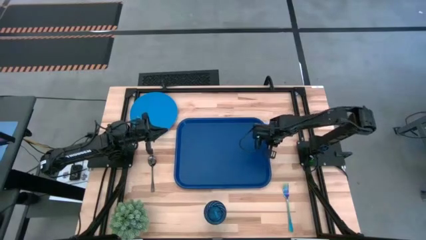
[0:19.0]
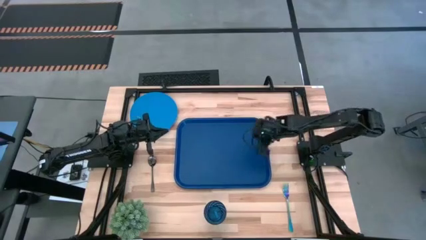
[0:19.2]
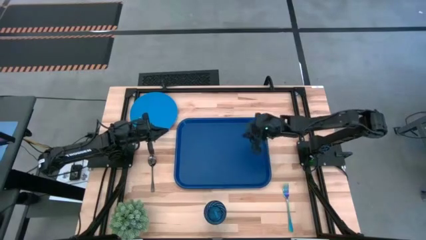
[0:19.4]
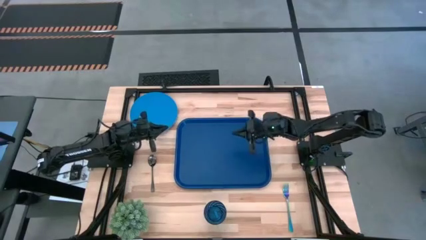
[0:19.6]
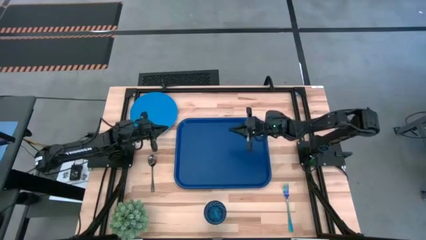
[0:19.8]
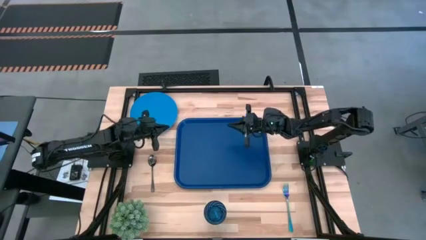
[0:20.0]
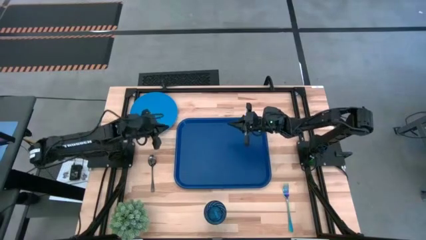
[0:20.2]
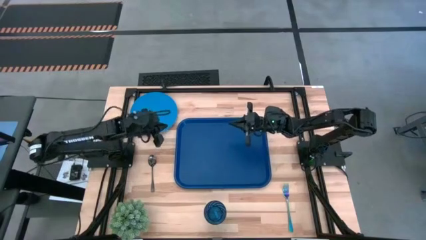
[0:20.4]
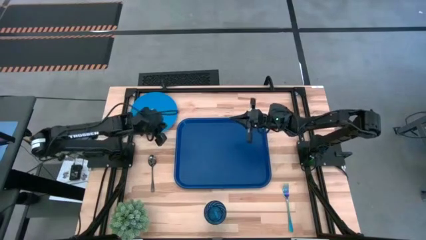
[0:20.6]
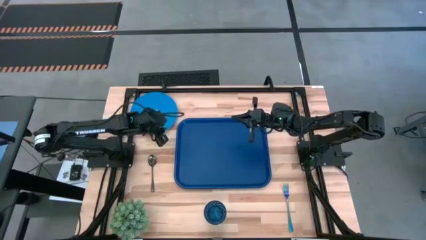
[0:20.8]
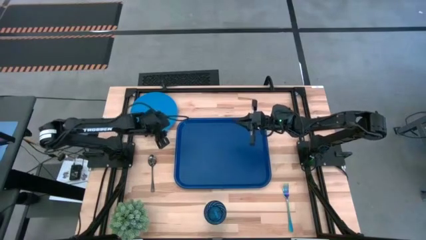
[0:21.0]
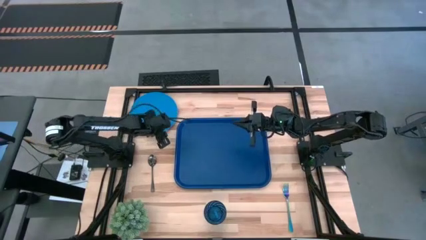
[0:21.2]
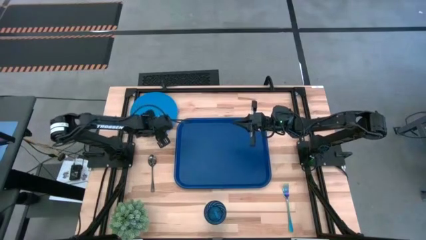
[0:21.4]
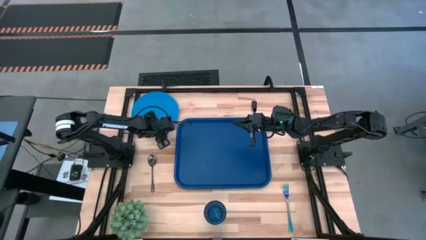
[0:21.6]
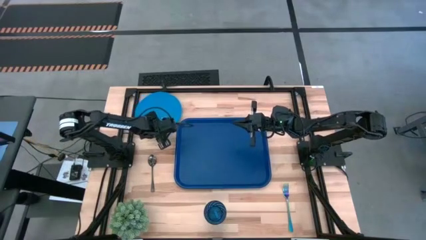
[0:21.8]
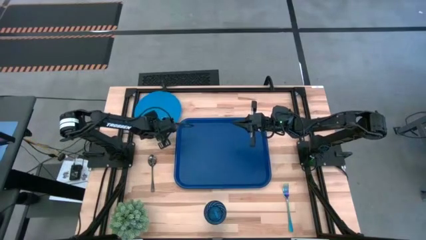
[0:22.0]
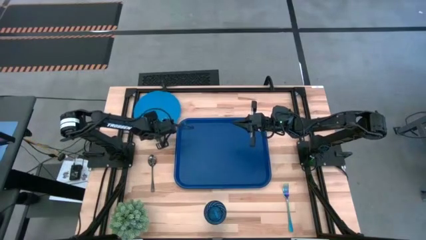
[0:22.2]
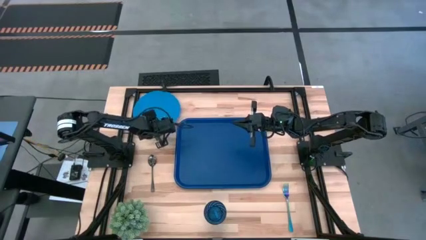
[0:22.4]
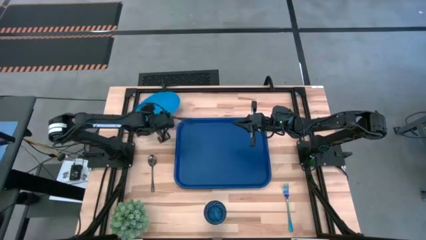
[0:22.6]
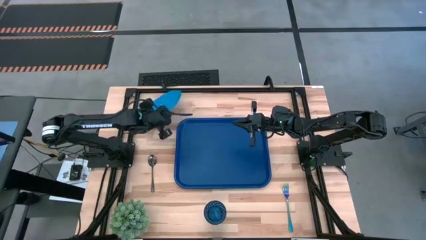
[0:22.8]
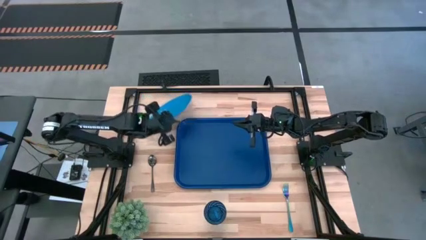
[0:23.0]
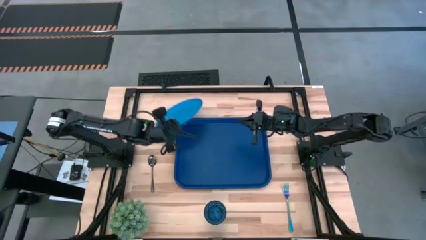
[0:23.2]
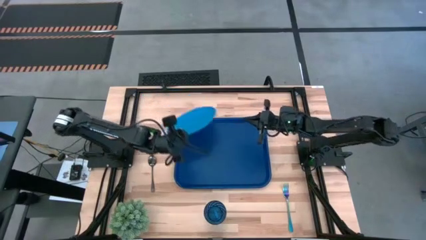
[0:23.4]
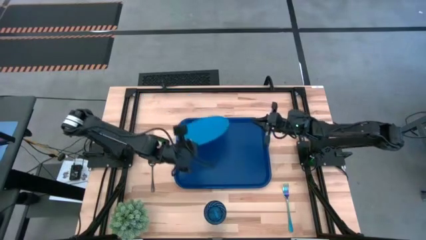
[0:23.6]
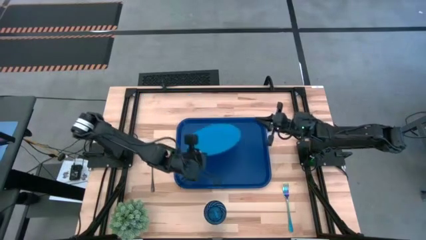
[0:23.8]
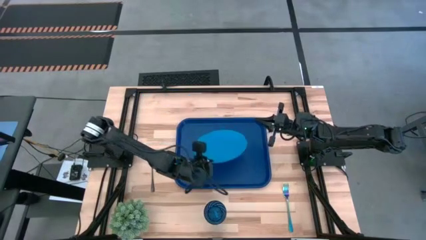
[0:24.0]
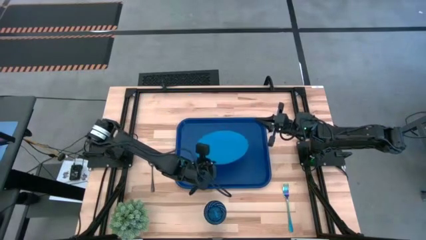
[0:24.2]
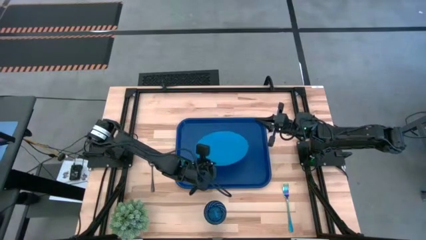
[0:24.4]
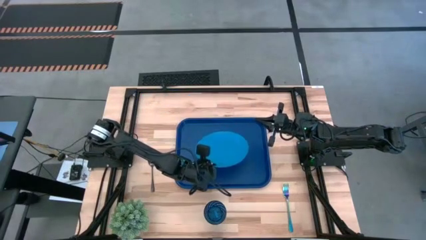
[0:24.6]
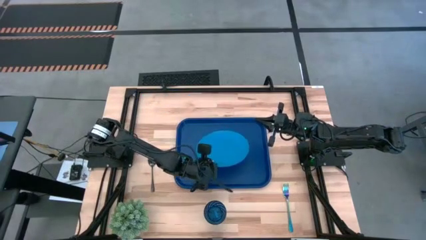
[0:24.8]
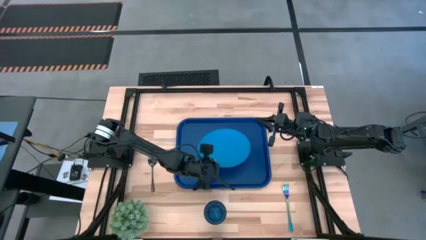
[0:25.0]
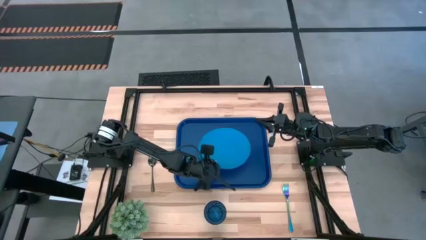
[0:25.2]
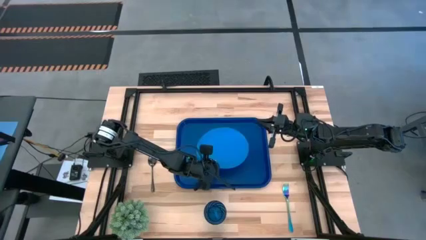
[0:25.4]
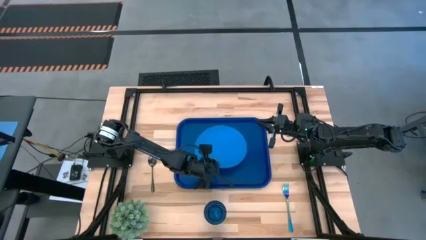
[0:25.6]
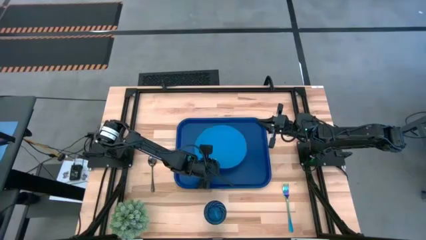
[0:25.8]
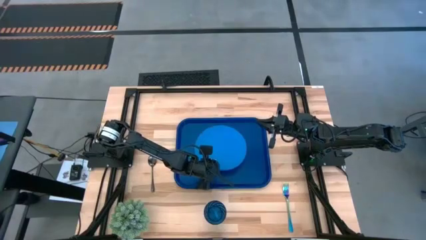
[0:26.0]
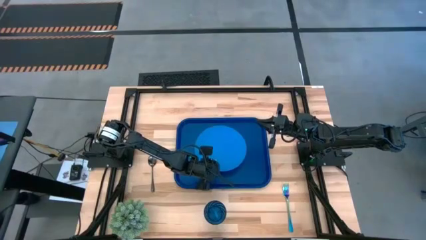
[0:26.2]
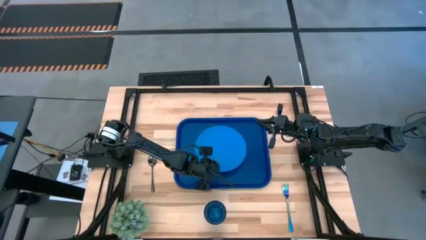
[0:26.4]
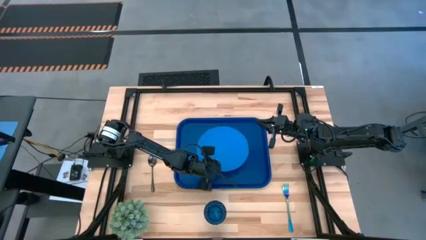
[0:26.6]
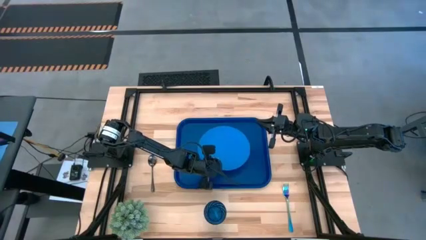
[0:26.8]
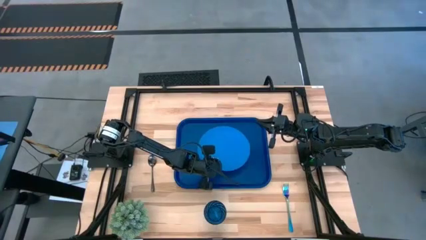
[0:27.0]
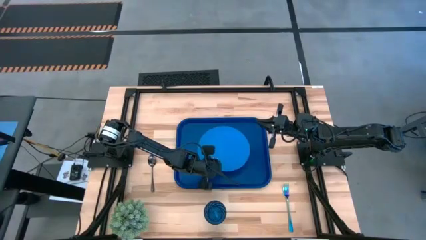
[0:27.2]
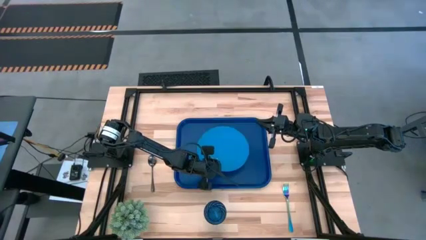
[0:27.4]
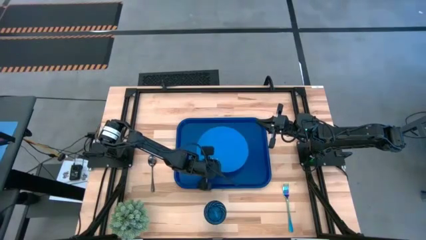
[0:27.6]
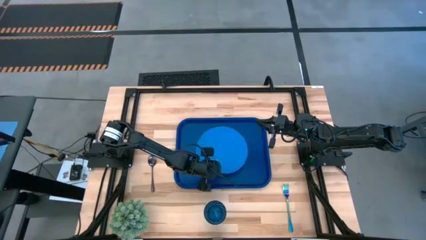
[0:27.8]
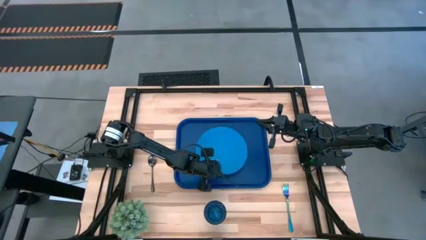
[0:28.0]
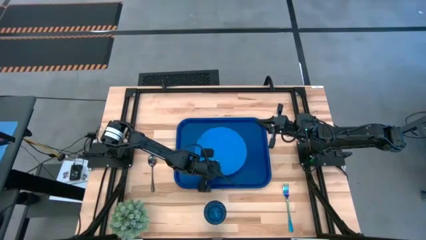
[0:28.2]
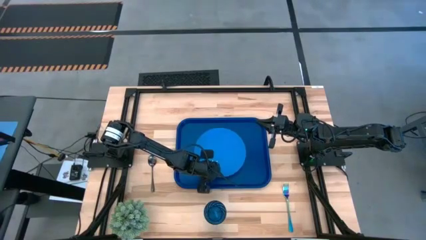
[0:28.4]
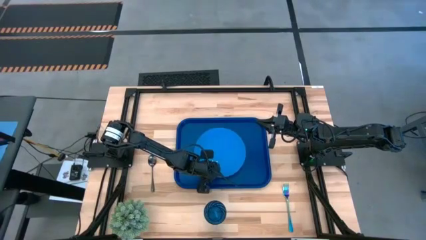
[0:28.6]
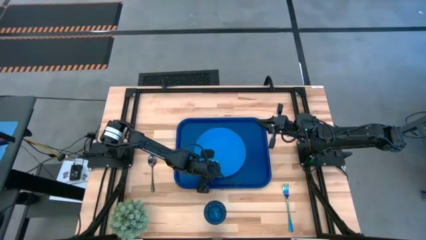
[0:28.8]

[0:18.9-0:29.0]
Task: Pick and place plate/cup/fork/spoon on tray
Put the blue plate in the middle of the dark blue tray

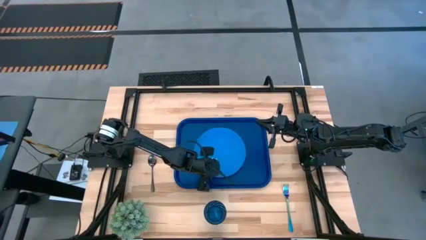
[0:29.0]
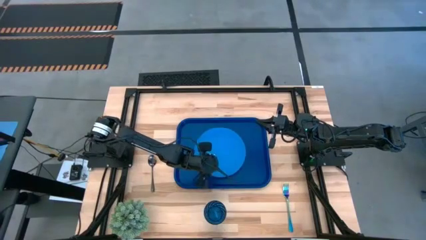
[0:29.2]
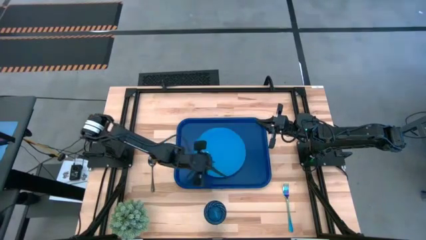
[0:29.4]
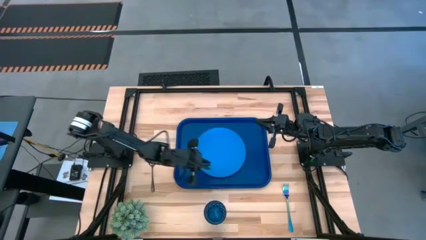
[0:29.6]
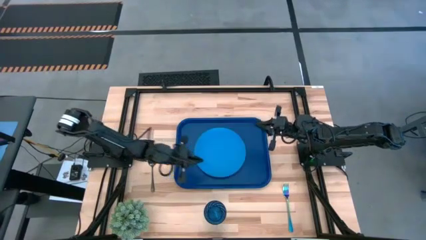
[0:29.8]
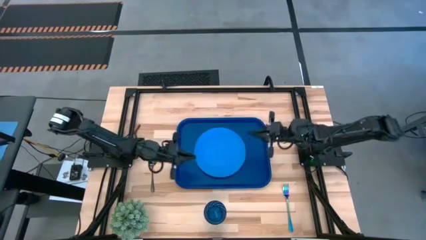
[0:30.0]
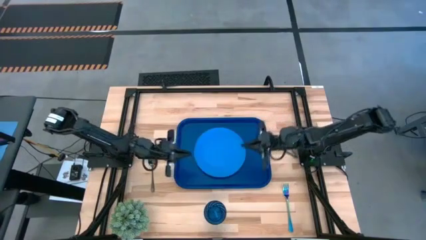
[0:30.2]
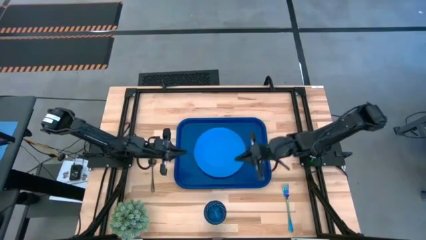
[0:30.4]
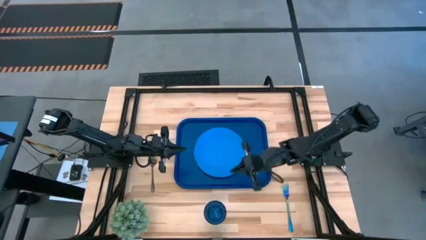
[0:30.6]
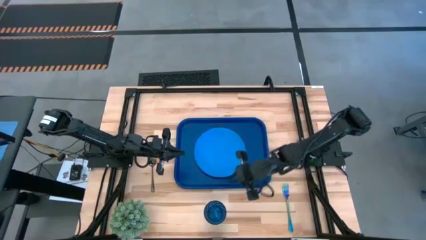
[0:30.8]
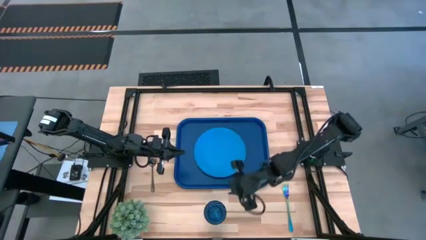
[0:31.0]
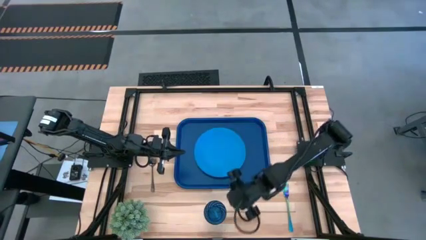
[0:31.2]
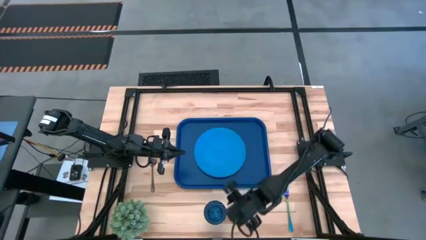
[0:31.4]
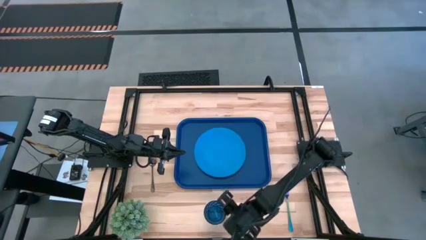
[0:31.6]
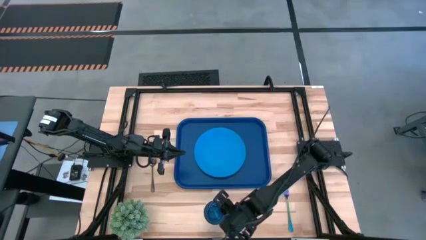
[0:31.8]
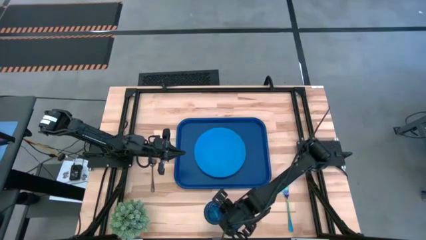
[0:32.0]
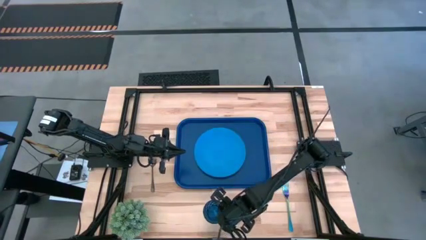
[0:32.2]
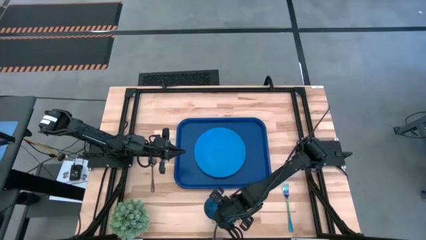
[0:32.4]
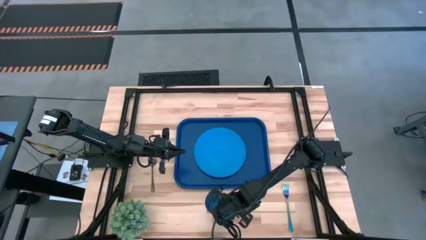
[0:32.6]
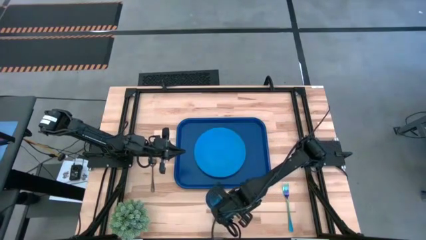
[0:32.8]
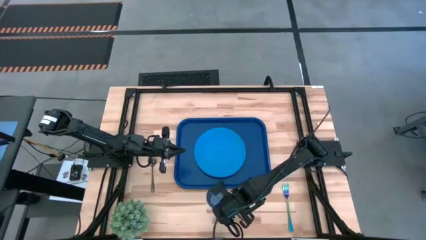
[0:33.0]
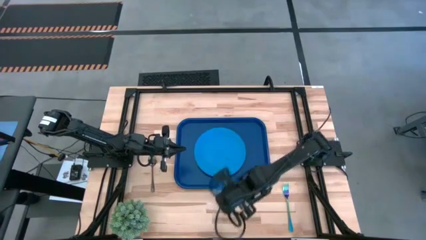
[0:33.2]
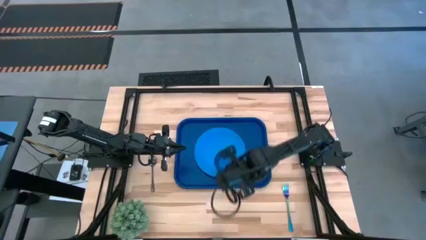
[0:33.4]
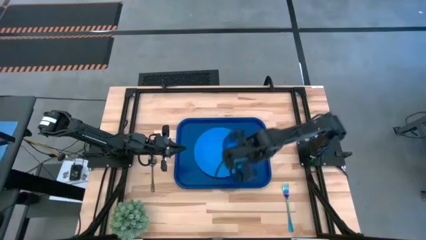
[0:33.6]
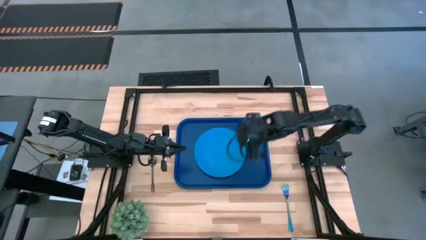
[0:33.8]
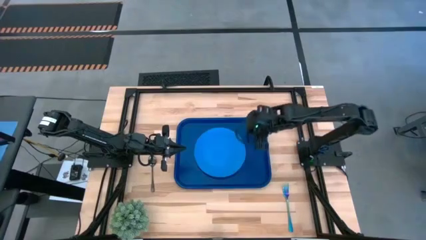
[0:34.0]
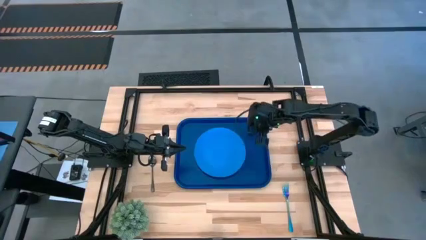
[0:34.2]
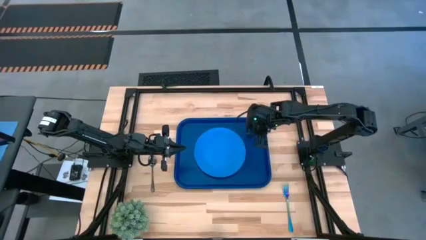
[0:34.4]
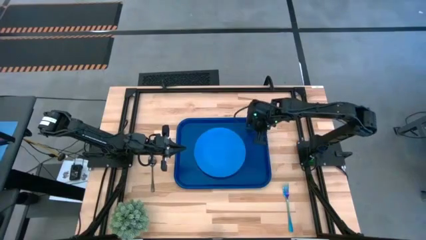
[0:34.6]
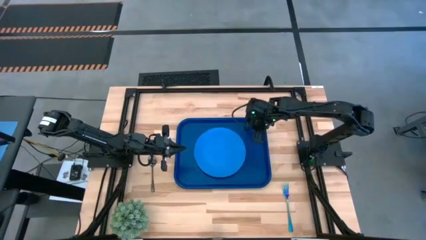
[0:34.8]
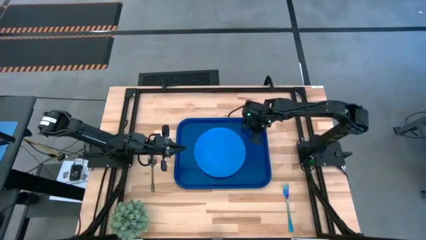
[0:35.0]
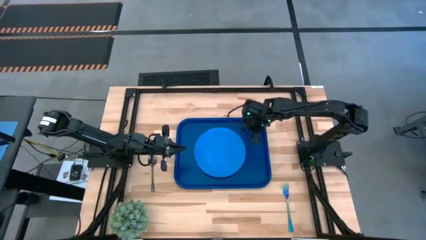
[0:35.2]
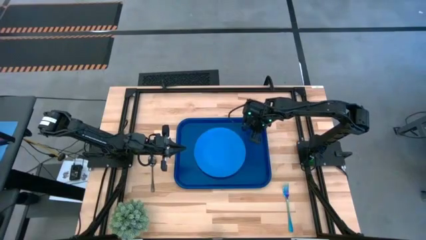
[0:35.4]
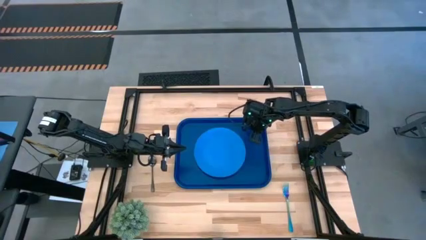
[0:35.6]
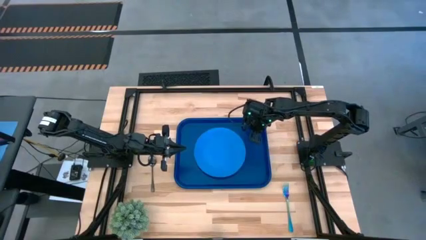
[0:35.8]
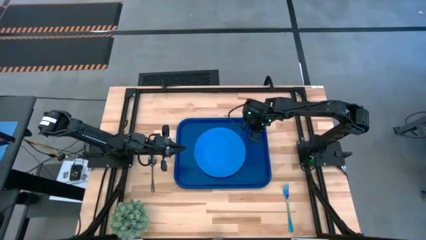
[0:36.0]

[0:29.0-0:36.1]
Put the blue cup on the dark blue tray to the top right of the blue plate
